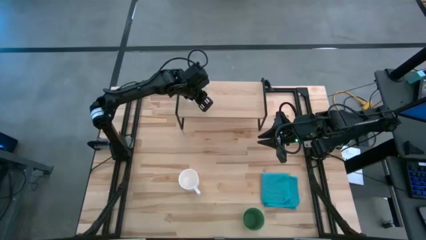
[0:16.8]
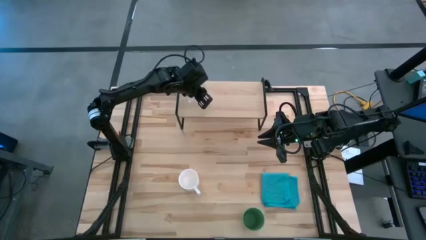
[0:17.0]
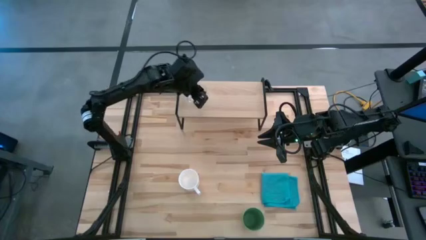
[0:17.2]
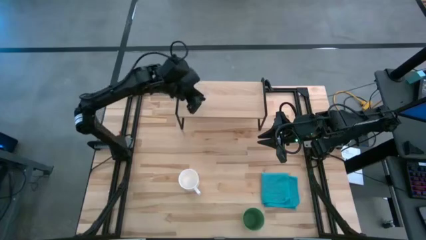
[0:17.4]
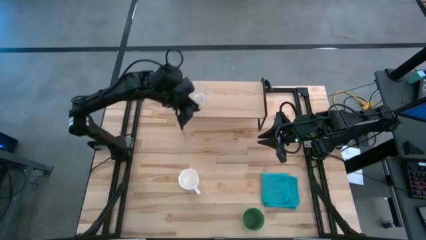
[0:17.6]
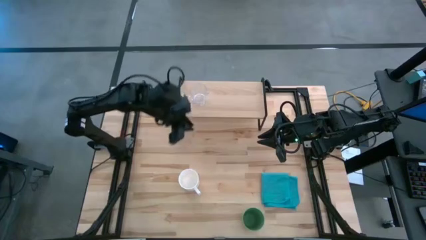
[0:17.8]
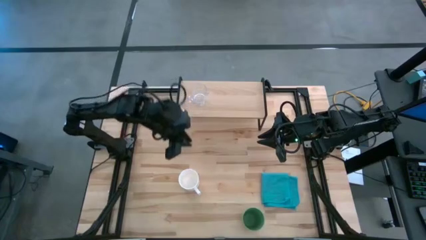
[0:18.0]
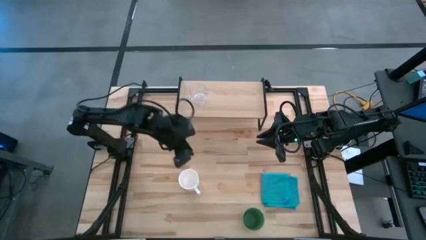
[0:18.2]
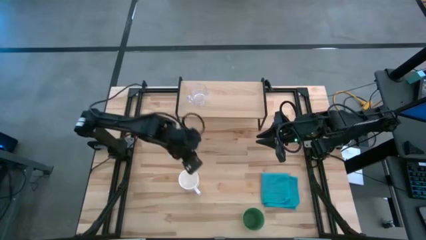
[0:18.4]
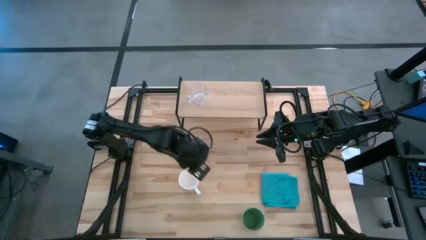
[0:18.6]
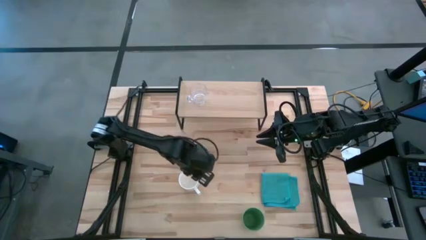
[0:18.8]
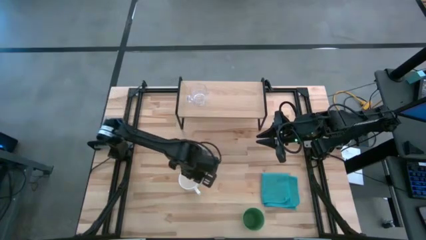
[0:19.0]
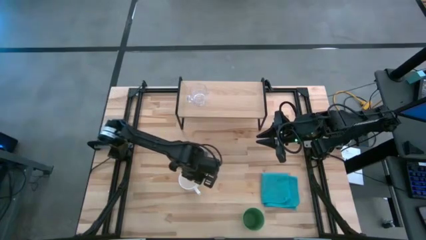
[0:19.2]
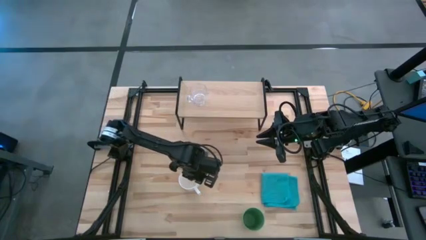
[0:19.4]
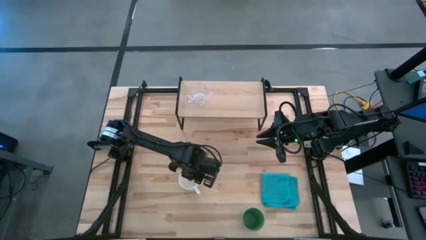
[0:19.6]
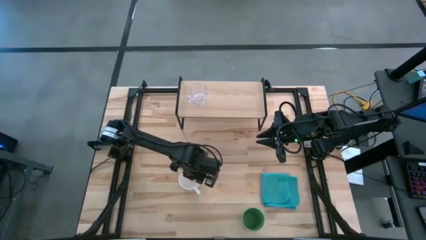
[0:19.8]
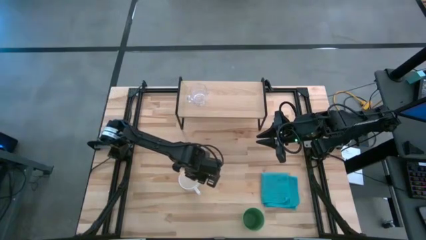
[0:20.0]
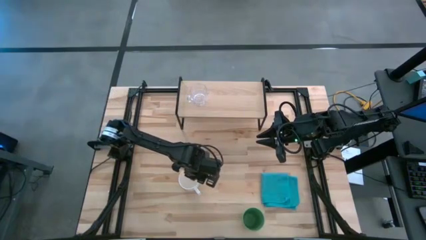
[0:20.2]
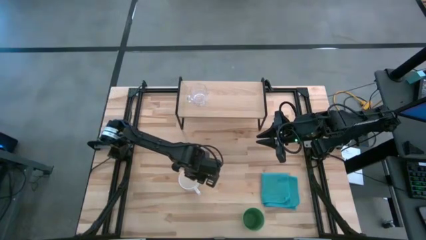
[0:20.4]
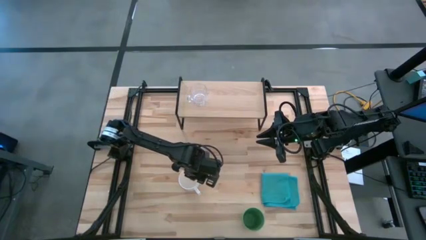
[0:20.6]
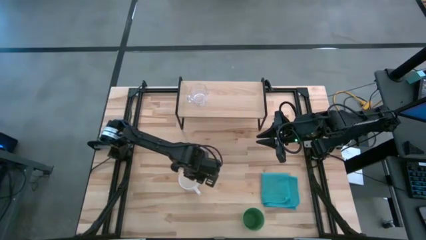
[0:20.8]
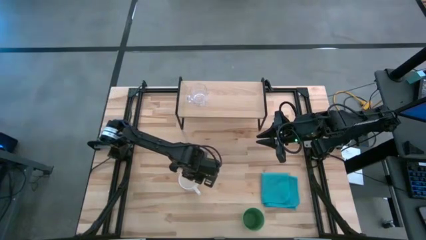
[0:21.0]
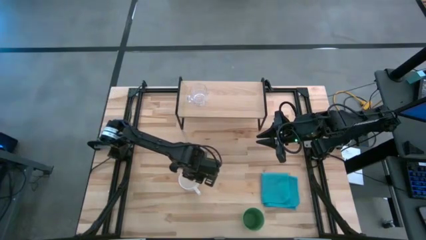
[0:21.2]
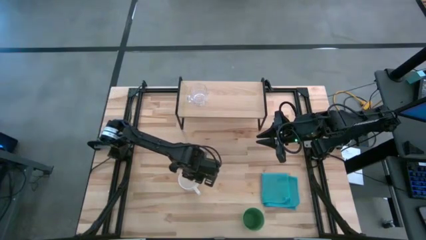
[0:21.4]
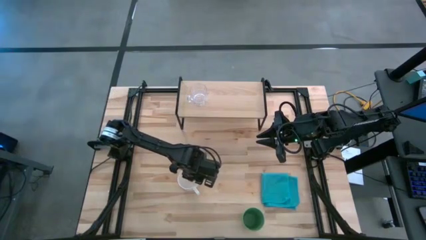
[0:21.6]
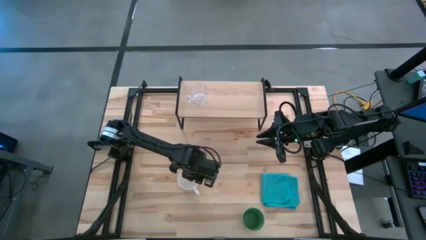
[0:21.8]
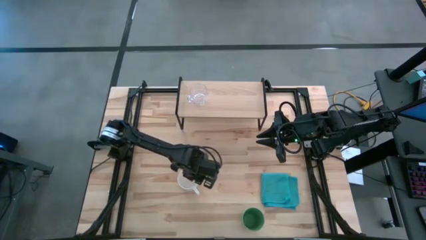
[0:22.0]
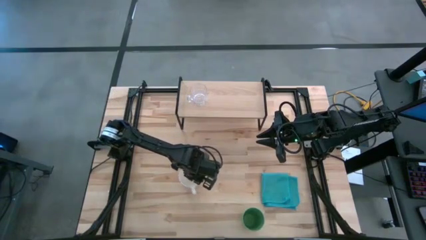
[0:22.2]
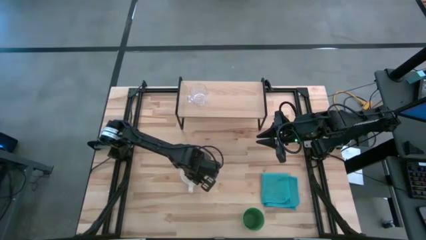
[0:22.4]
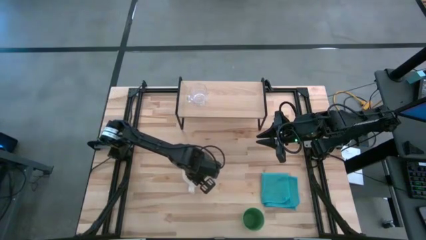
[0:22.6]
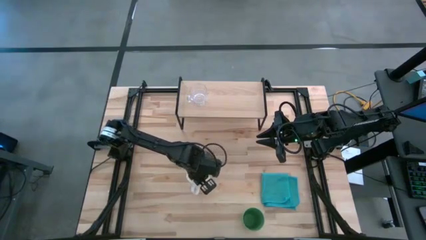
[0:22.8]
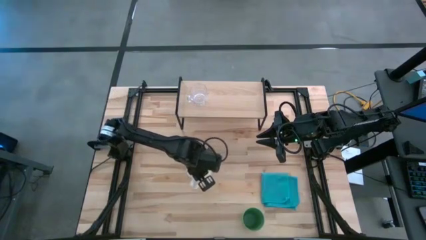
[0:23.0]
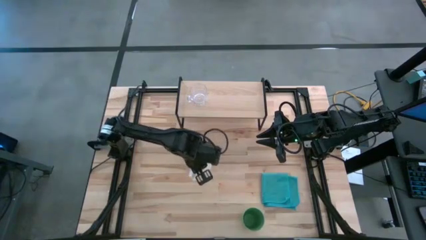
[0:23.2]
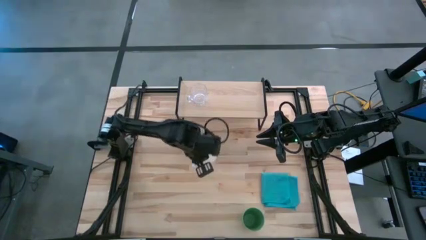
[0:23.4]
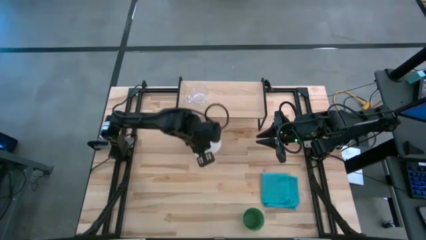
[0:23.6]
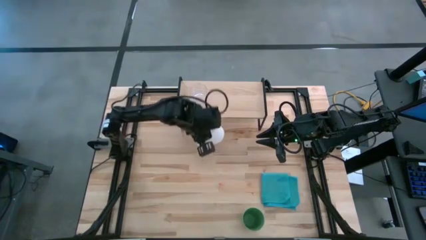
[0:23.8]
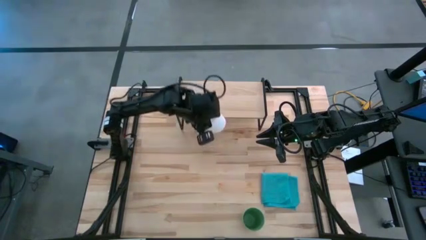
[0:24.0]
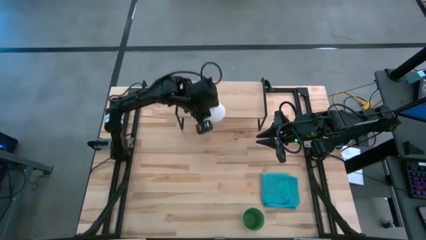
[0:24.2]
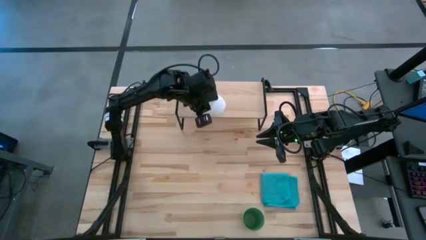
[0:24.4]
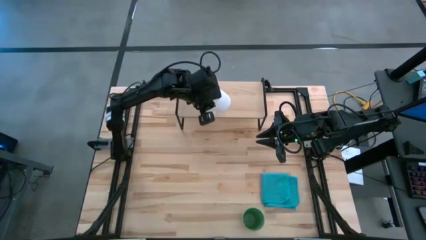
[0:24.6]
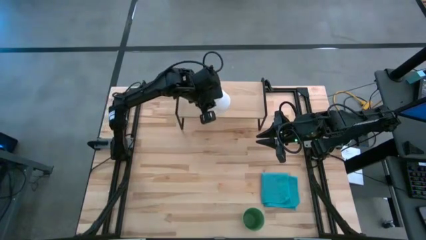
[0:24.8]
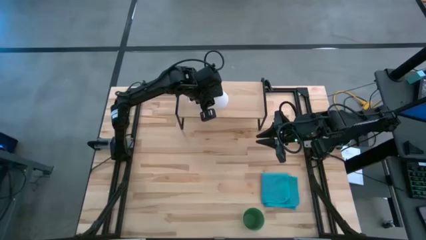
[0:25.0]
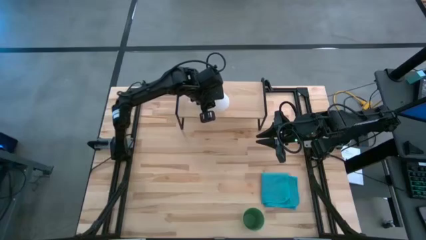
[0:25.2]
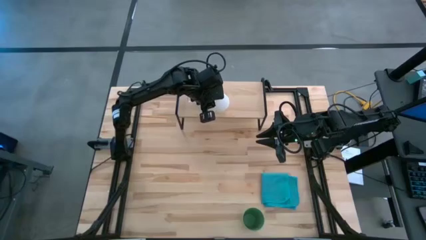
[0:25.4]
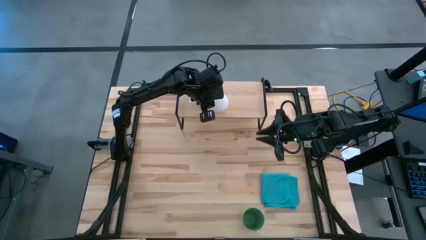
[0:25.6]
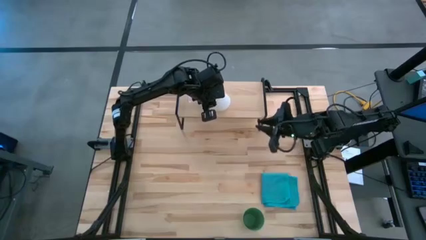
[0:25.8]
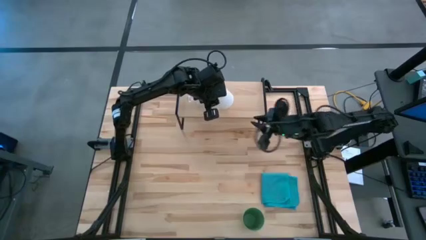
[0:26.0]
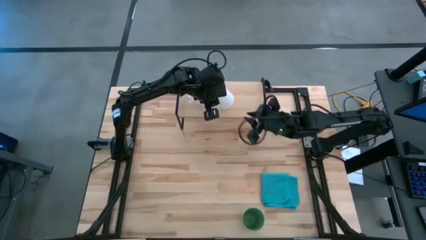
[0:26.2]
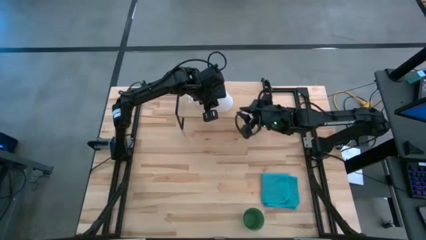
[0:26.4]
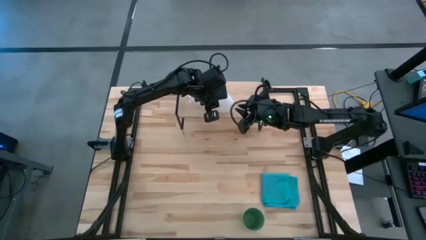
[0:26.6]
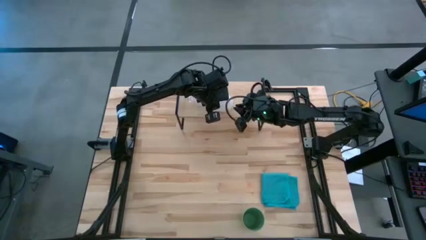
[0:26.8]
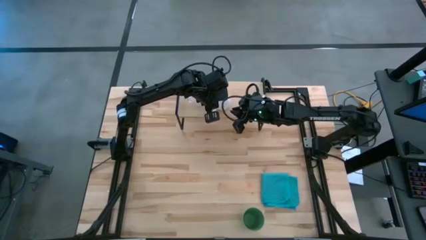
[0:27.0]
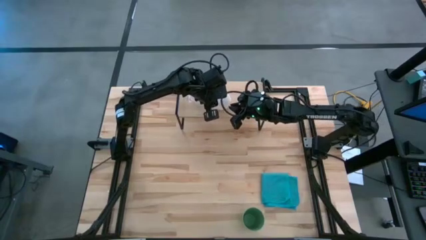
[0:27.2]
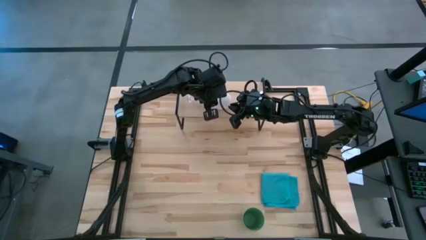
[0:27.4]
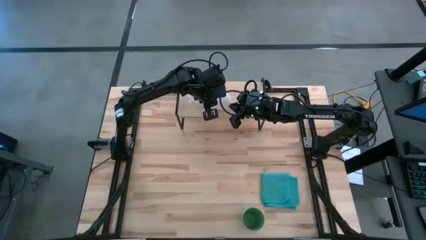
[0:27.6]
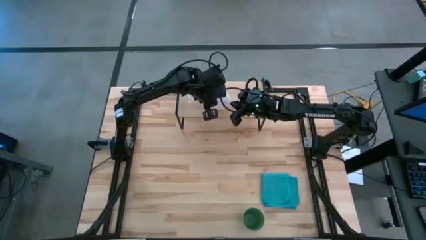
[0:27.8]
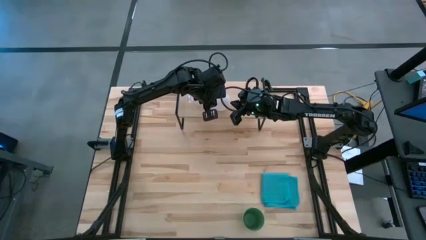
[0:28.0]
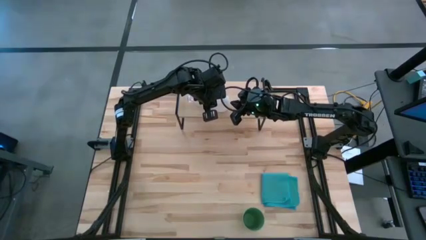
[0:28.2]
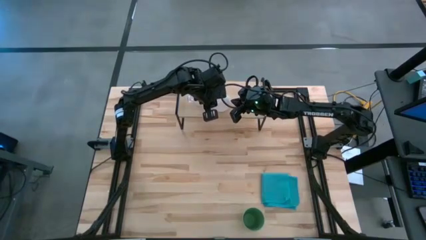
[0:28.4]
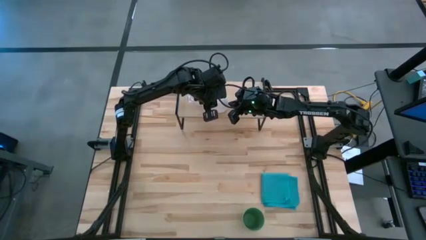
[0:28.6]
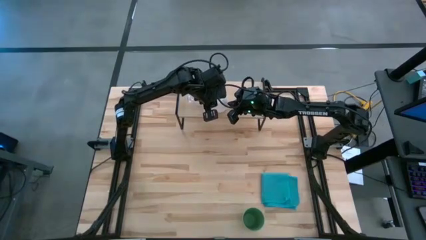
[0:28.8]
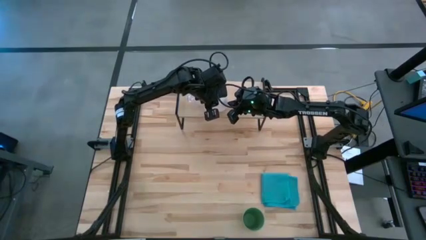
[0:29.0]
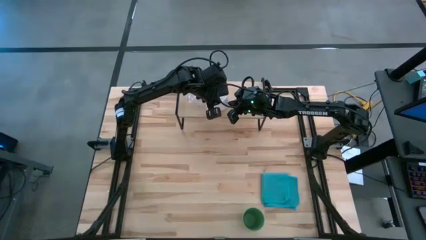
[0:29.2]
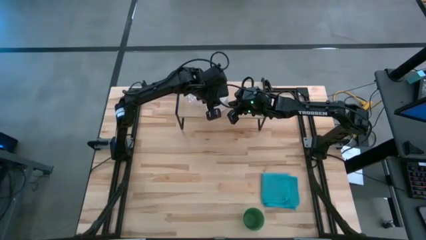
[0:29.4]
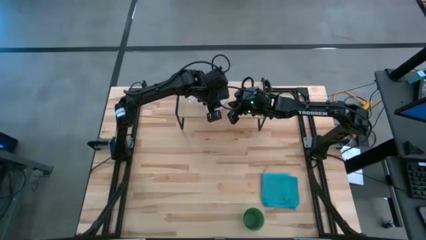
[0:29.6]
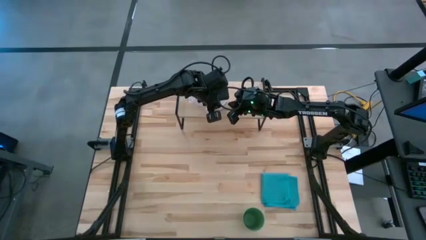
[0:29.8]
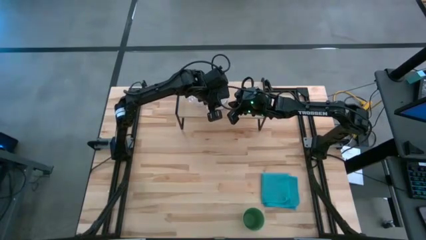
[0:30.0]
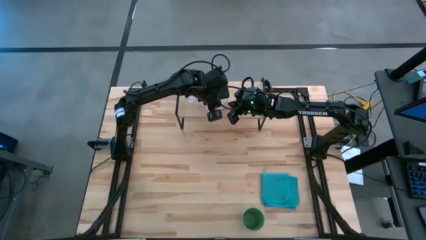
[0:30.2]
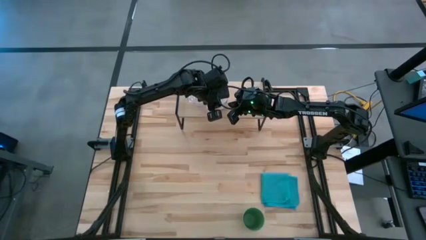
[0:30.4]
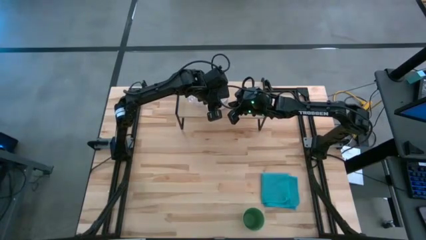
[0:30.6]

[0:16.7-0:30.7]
Task: Stack small to large cups/mugs on shelf
Put the white mug on the shelf

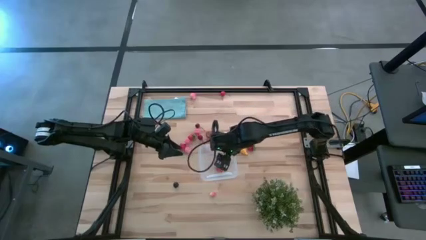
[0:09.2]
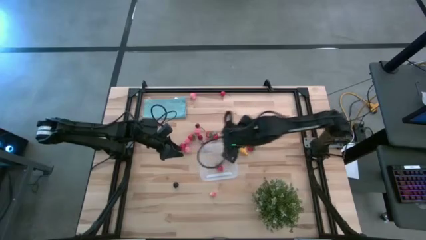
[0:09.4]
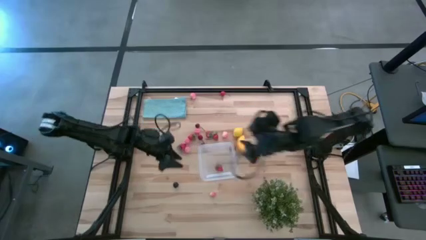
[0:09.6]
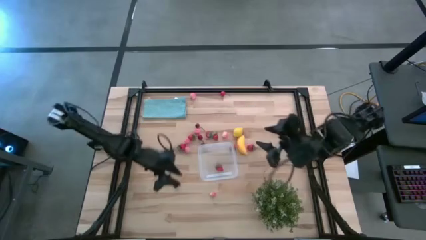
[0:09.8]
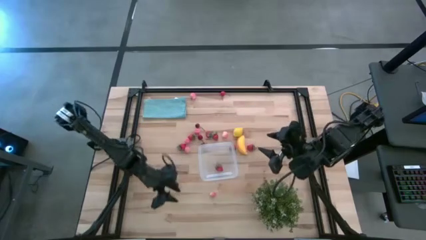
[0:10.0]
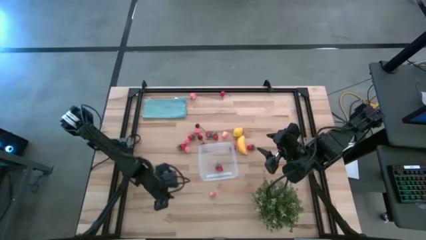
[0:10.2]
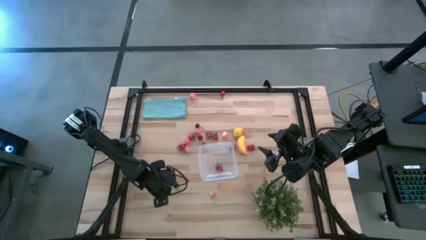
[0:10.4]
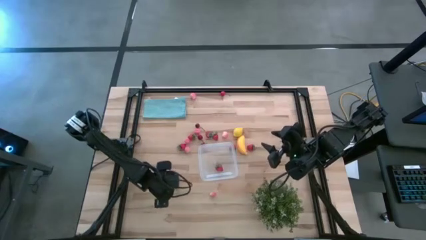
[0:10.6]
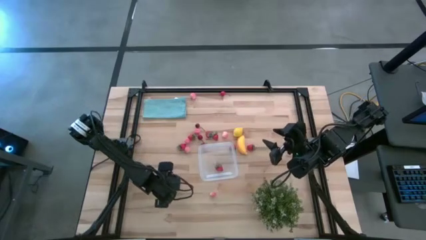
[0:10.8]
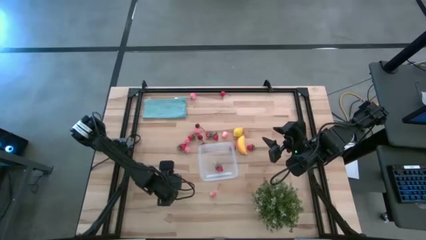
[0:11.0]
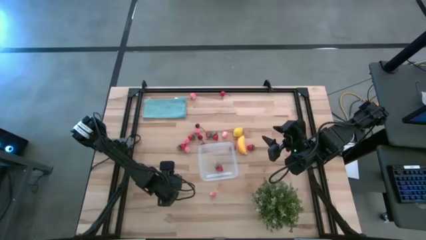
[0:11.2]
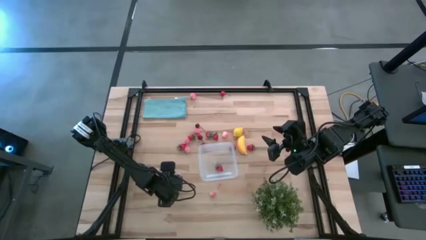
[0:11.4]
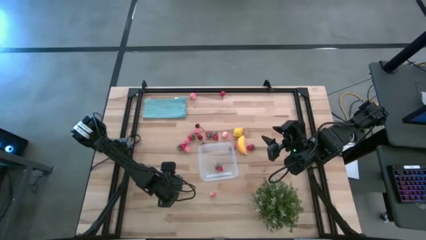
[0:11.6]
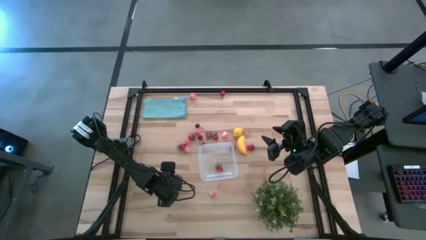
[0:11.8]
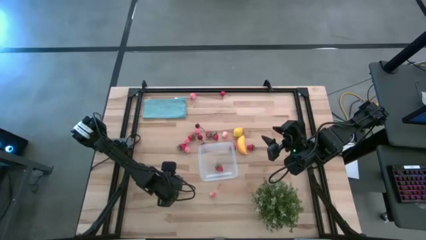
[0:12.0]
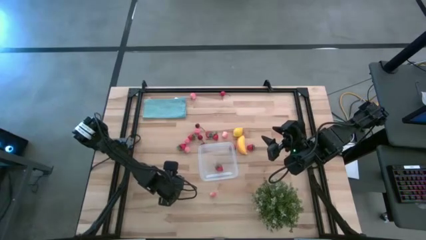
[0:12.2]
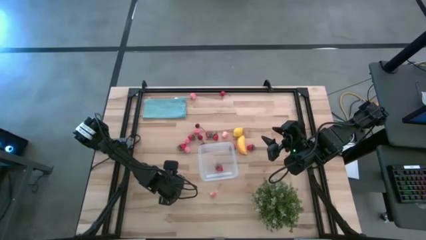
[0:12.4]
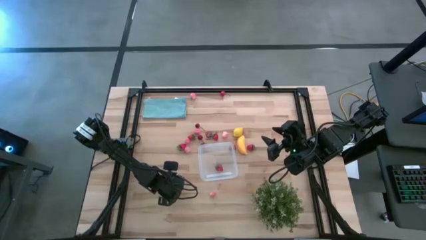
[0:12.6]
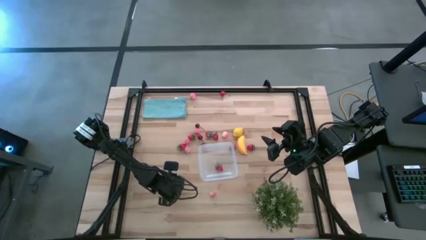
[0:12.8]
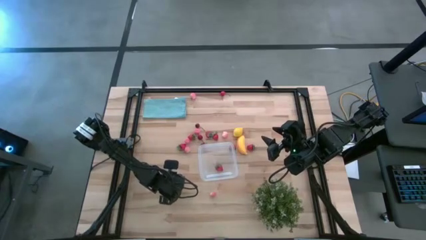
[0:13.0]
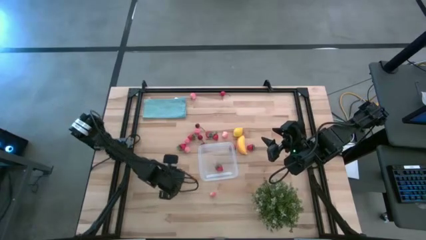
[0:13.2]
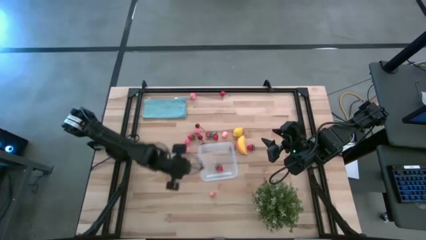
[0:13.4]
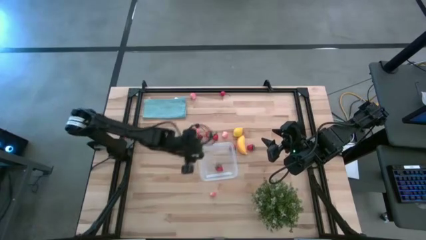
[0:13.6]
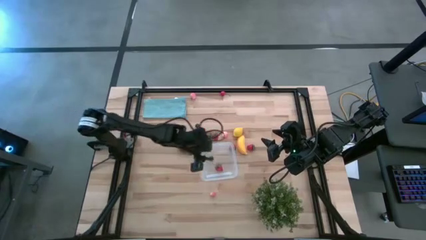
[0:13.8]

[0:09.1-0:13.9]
Task: Pick and placing Produce into tupperware
Put the blueberry into the transparent bin
